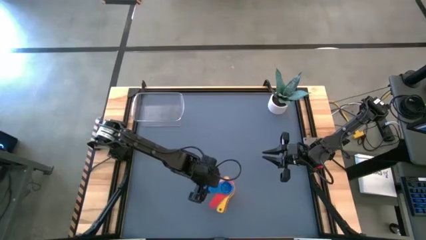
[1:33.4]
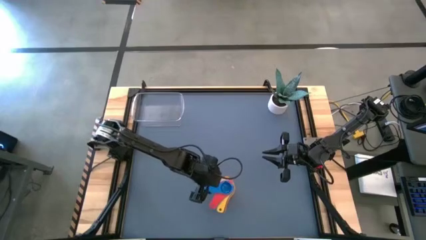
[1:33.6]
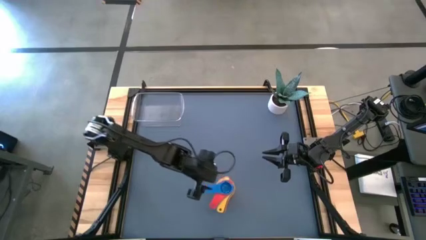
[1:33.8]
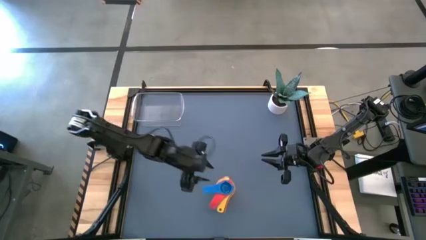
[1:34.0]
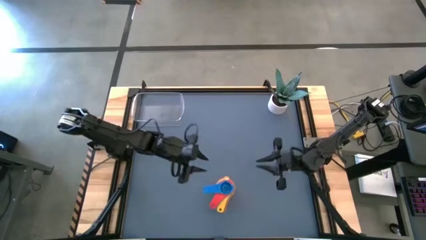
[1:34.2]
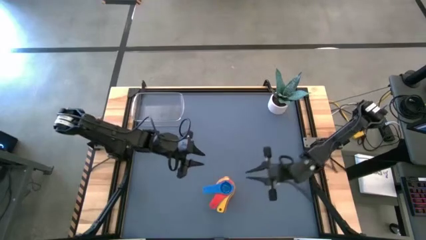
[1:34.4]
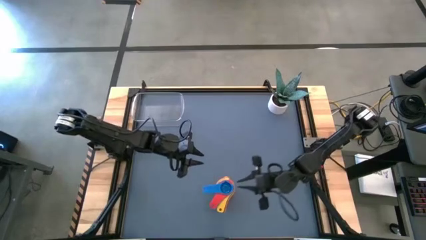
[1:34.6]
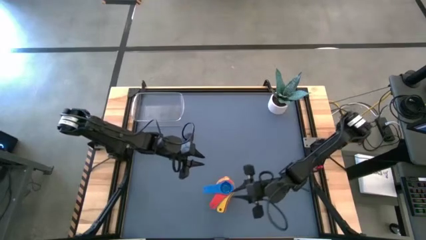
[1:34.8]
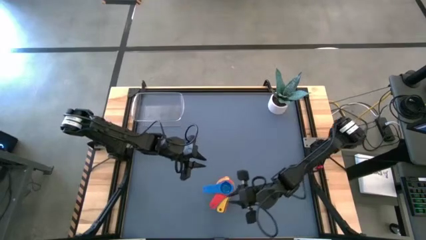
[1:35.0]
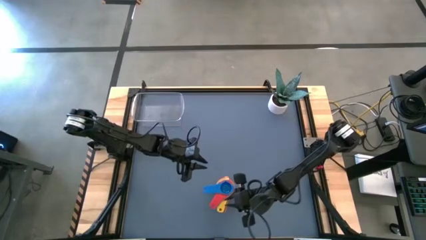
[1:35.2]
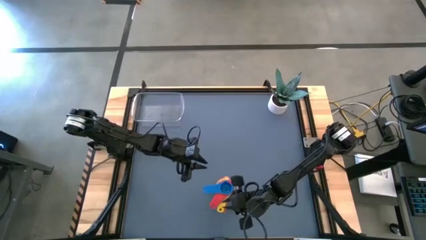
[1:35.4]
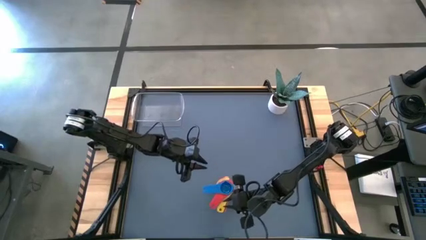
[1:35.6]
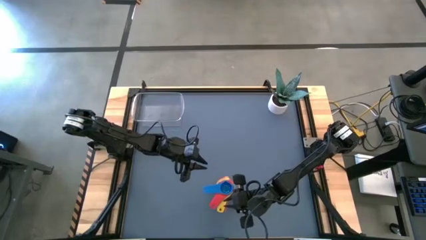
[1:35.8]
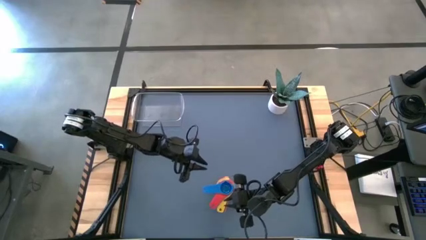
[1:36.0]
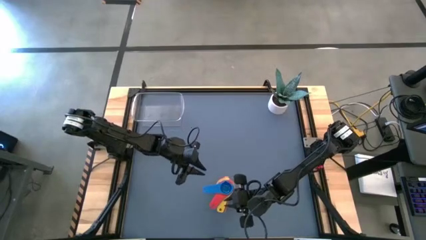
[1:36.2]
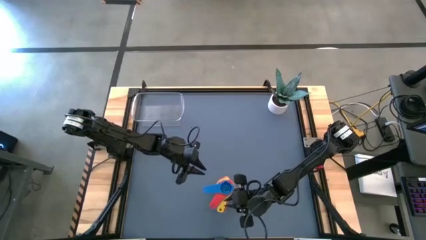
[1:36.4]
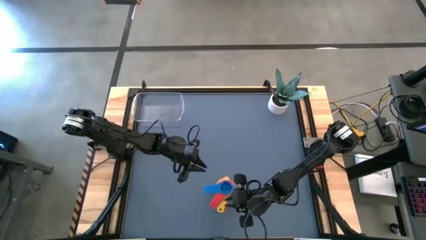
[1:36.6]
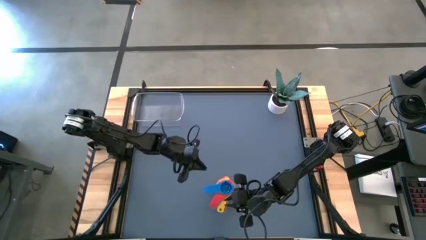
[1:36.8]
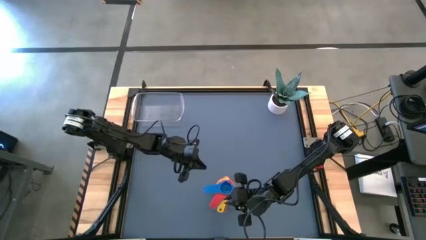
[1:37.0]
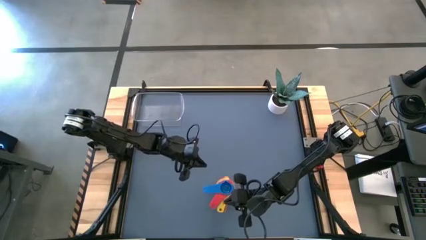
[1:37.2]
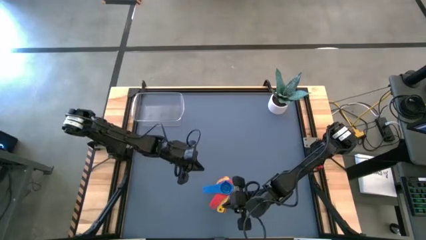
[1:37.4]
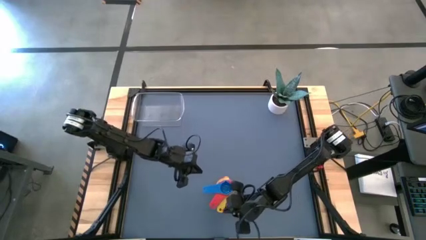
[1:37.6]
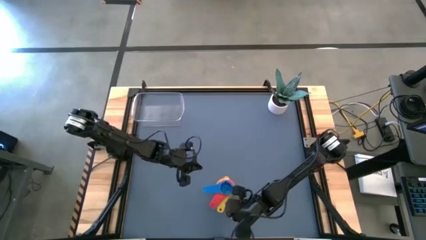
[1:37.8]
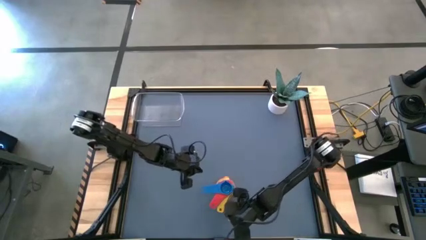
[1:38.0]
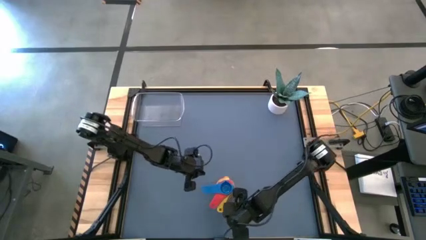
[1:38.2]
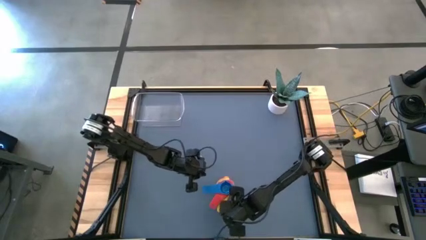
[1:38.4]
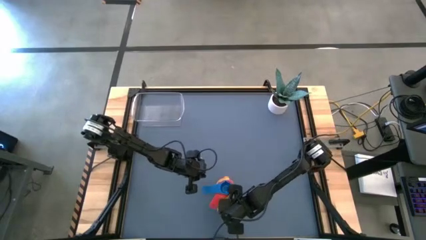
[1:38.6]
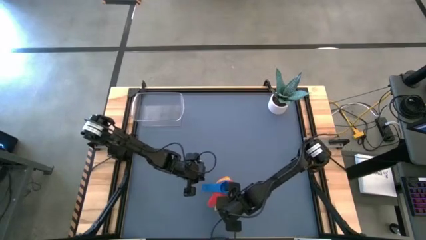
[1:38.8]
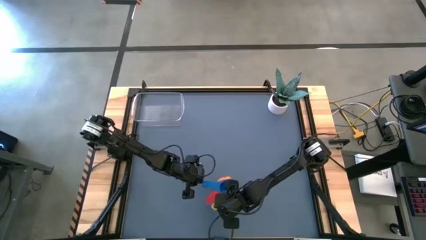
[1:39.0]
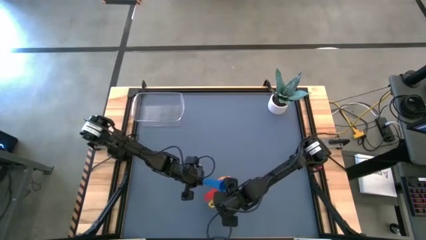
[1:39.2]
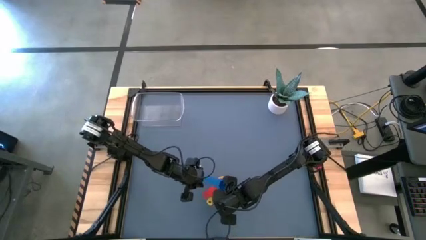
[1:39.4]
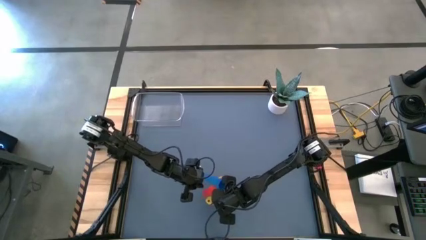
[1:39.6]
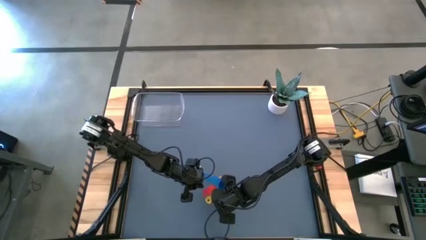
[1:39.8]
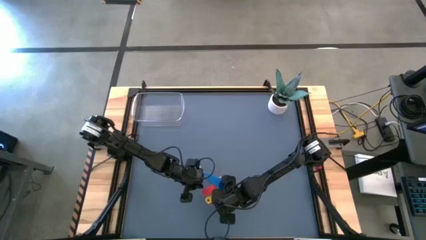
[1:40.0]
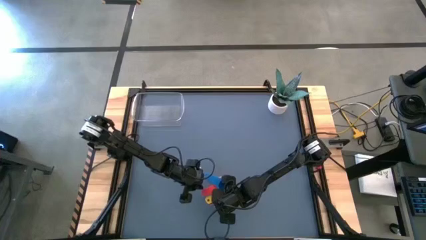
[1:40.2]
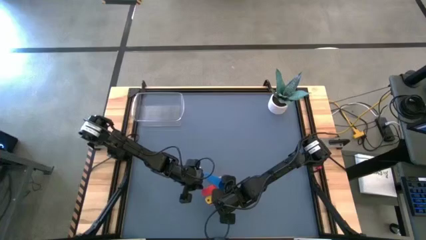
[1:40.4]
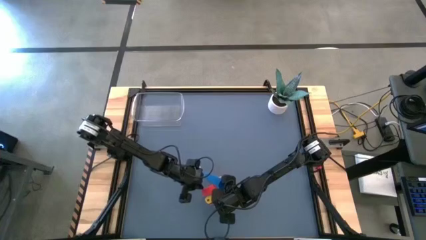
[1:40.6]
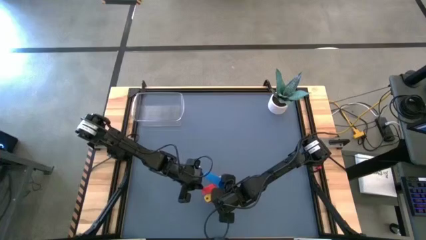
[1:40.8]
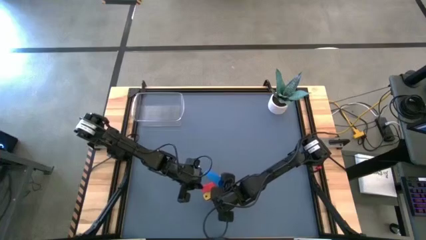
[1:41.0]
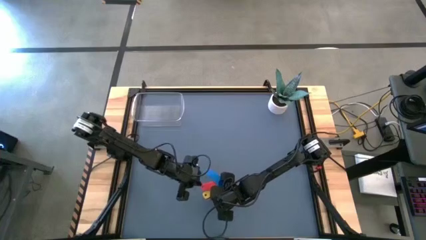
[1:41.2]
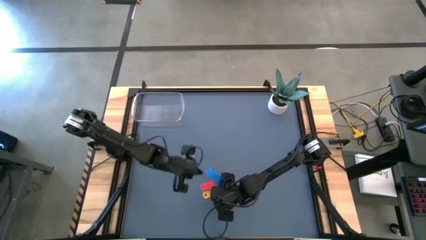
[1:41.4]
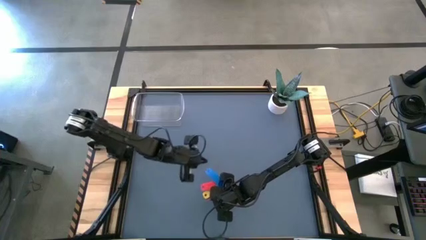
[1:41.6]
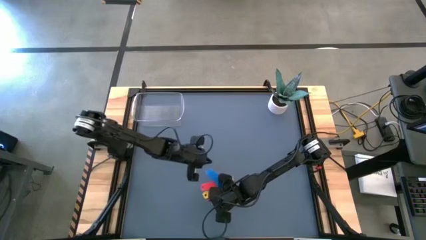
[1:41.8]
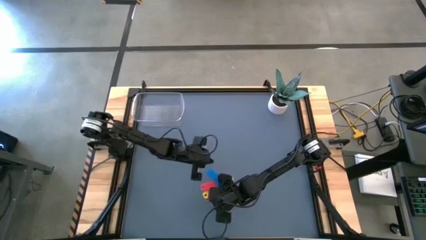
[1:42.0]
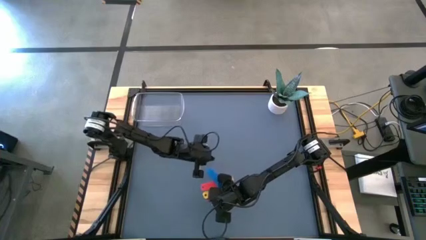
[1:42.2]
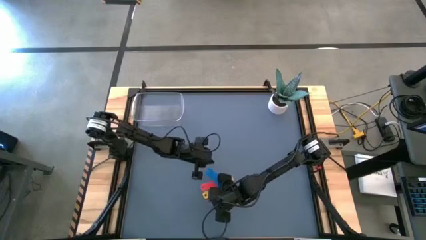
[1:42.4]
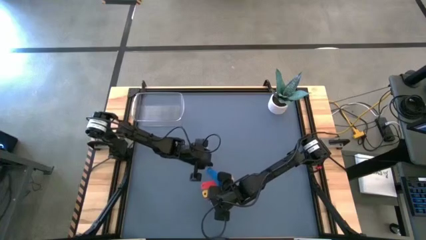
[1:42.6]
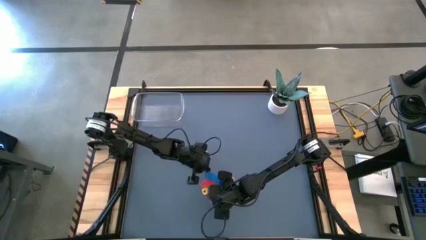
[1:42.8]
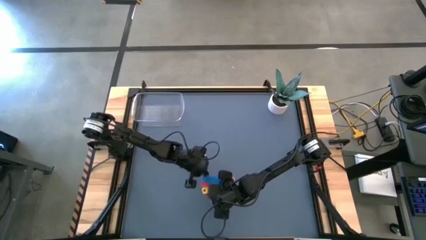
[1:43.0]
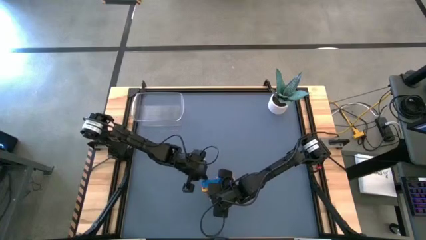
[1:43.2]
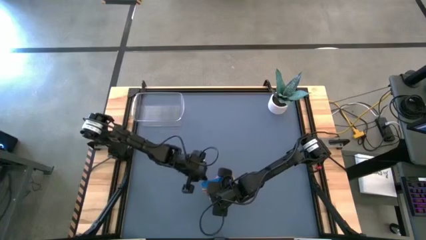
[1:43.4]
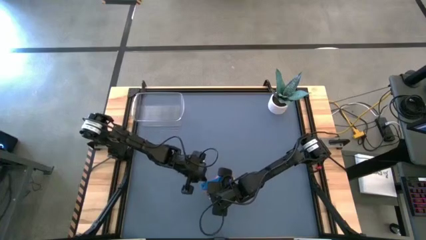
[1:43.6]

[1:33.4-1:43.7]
Task: Nest measuring cups in basket
Adjust the stacked measuring cups

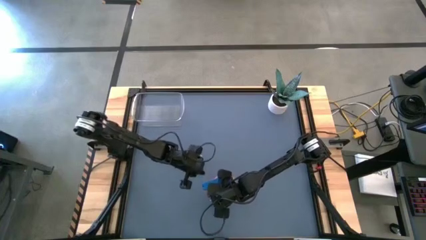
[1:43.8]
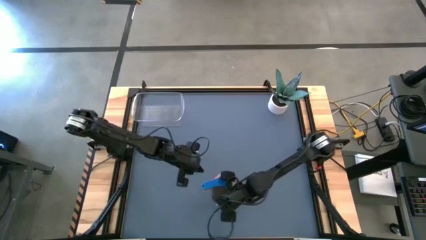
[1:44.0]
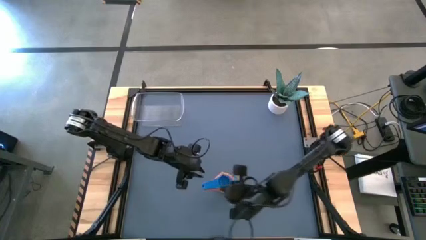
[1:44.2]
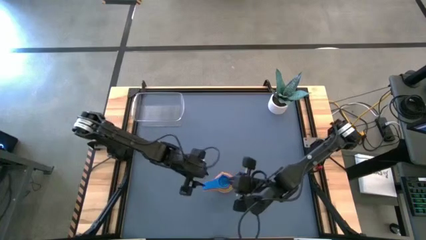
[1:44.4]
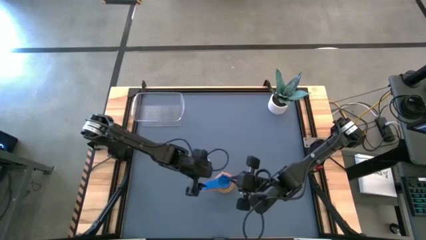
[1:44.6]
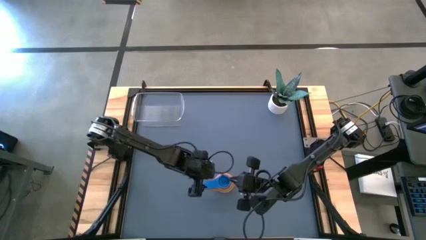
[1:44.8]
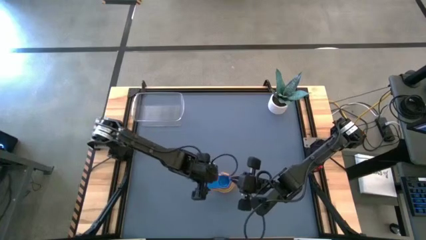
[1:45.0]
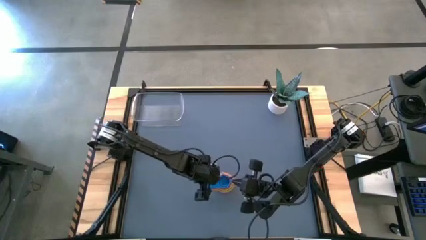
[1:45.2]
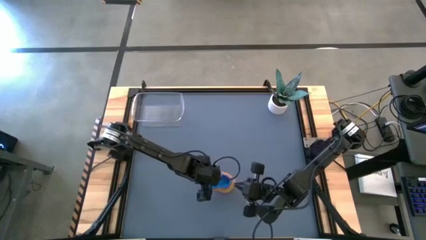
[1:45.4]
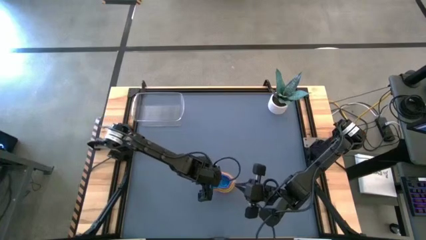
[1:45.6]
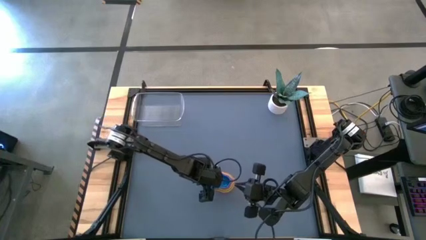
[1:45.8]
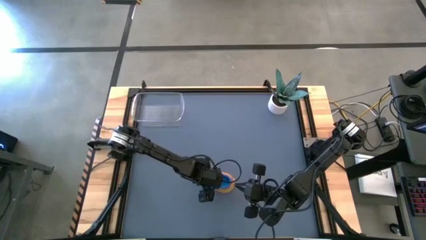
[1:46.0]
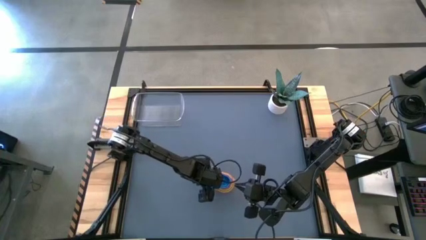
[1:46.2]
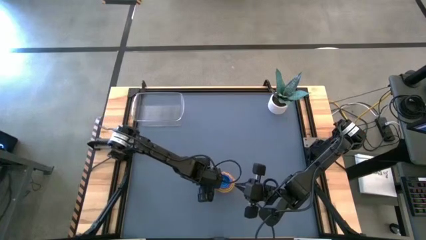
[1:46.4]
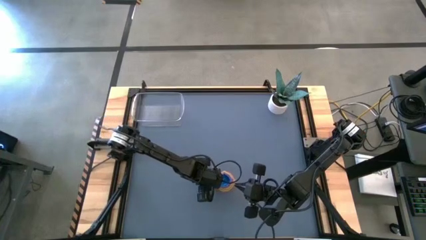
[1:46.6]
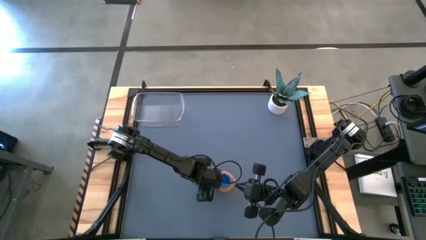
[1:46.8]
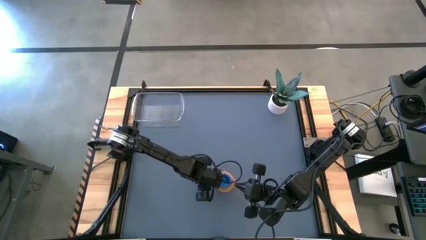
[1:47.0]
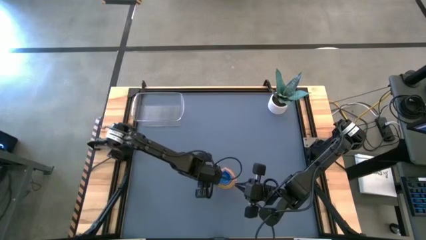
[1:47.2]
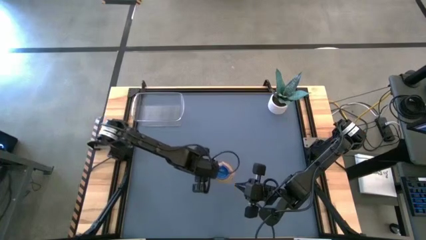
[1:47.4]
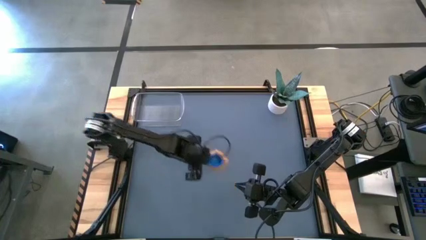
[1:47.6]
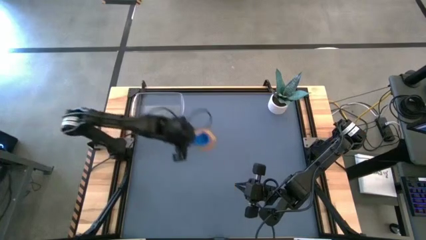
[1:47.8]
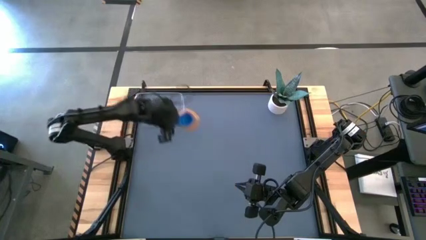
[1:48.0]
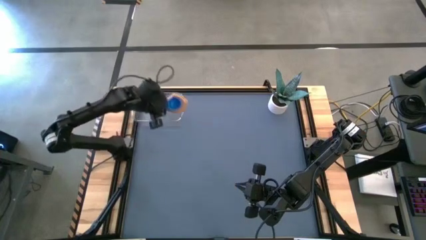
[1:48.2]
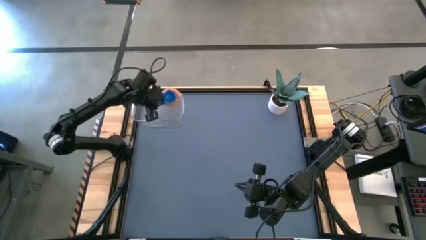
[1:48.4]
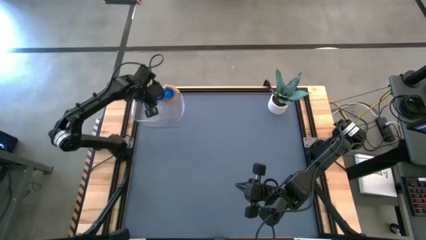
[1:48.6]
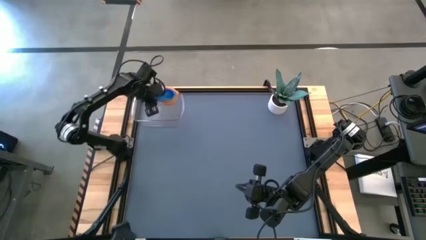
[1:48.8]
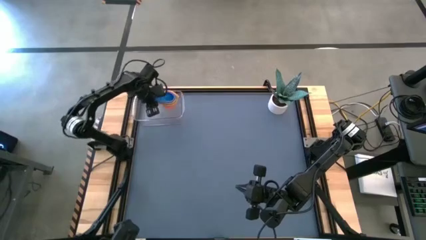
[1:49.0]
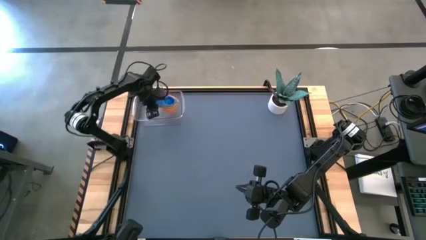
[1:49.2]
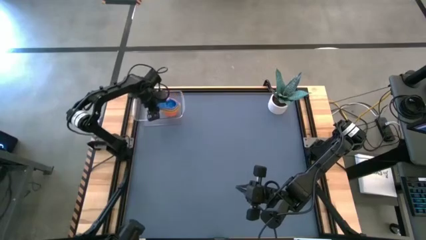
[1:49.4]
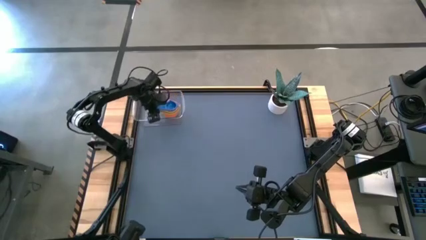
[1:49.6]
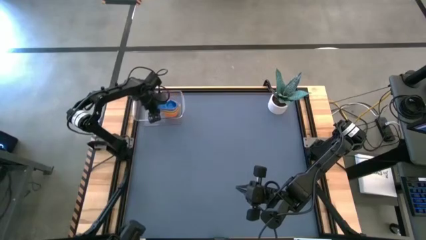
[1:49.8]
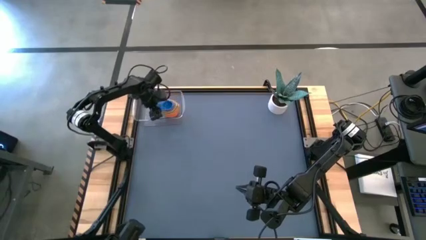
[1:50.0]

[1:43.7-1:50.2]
Put the stacked measuring cups into the transparent bin
